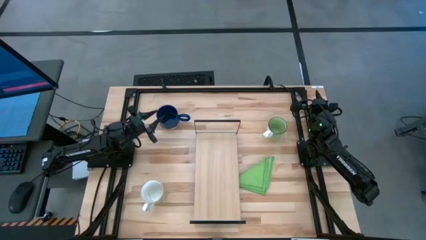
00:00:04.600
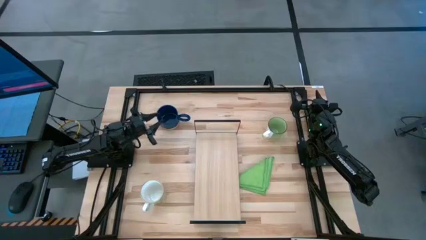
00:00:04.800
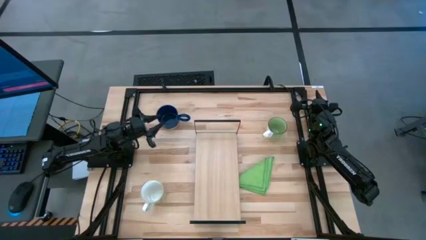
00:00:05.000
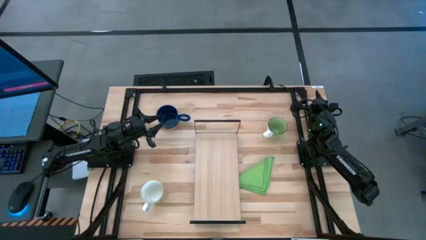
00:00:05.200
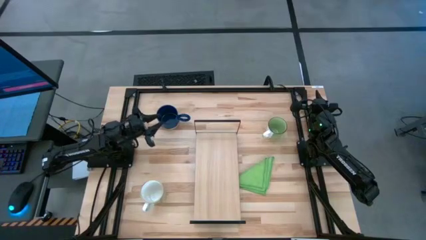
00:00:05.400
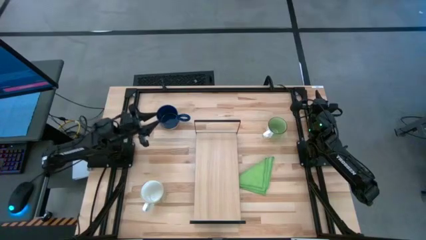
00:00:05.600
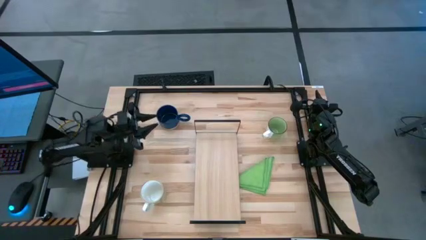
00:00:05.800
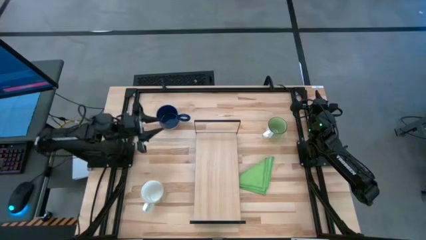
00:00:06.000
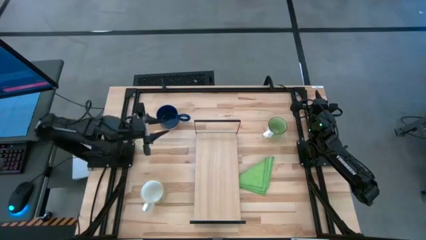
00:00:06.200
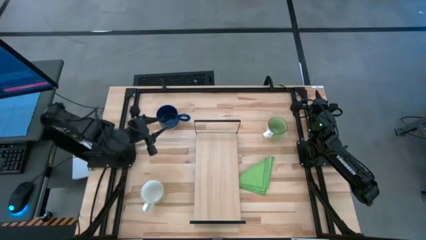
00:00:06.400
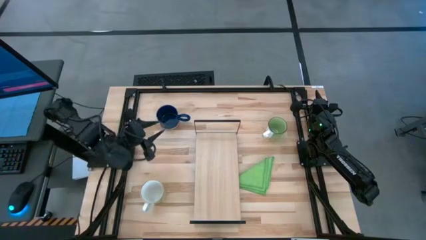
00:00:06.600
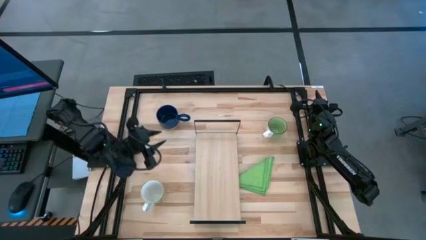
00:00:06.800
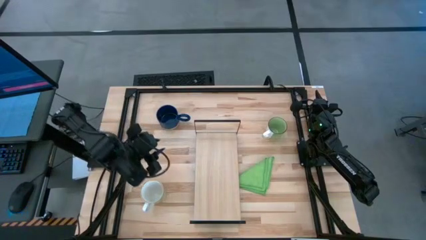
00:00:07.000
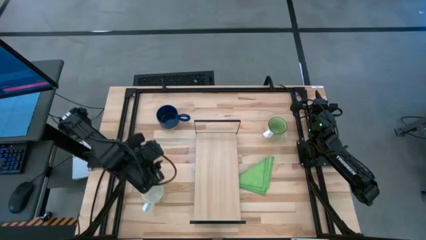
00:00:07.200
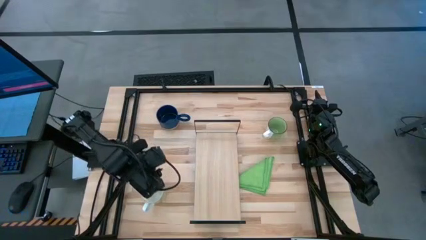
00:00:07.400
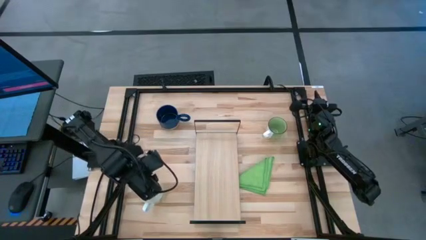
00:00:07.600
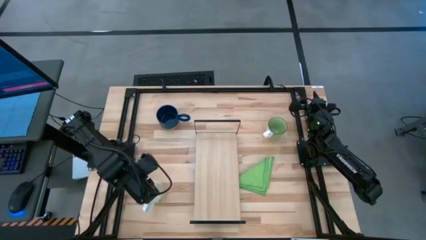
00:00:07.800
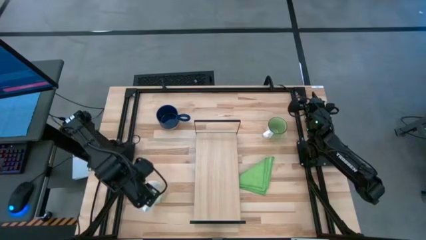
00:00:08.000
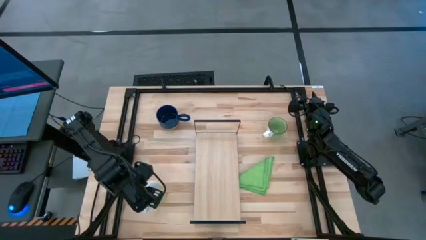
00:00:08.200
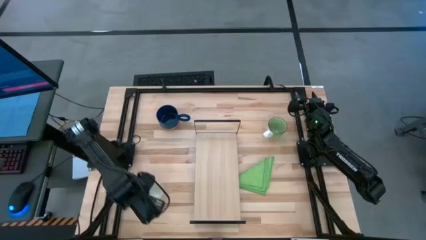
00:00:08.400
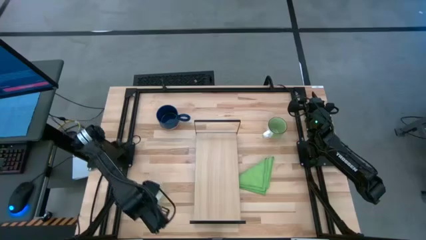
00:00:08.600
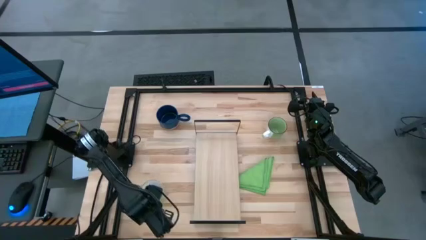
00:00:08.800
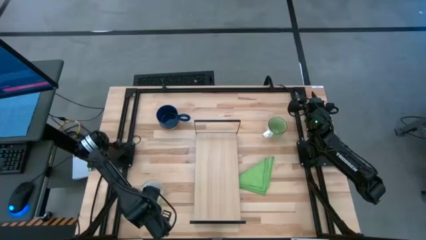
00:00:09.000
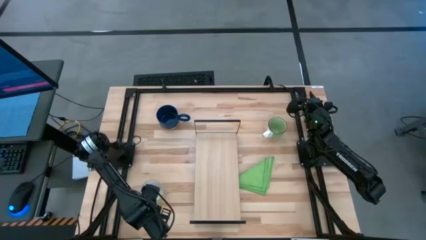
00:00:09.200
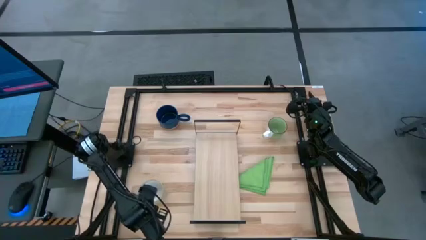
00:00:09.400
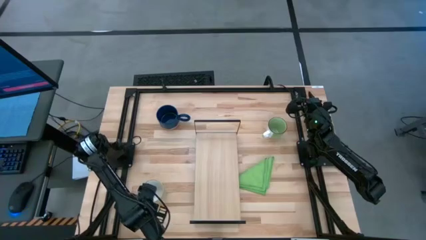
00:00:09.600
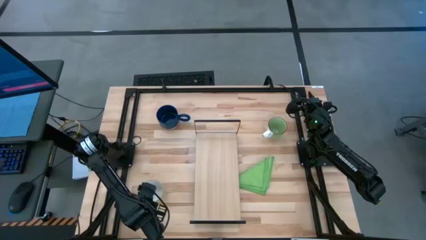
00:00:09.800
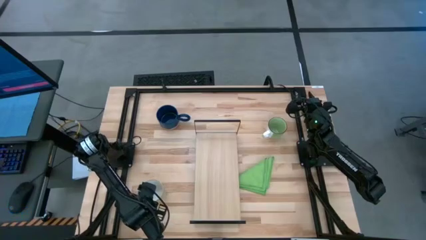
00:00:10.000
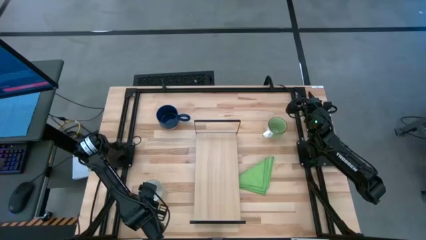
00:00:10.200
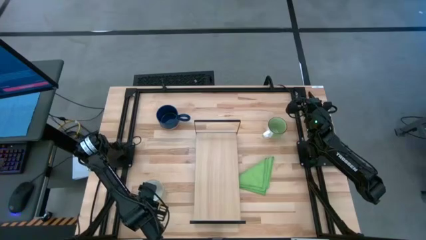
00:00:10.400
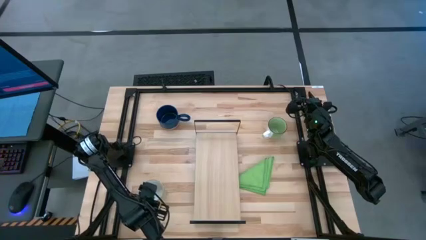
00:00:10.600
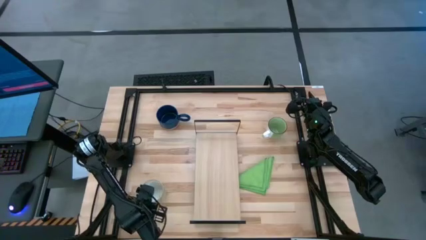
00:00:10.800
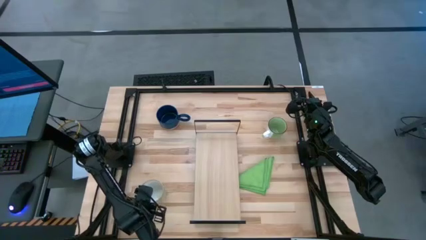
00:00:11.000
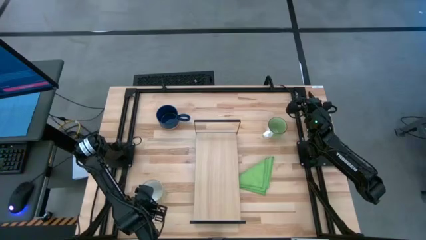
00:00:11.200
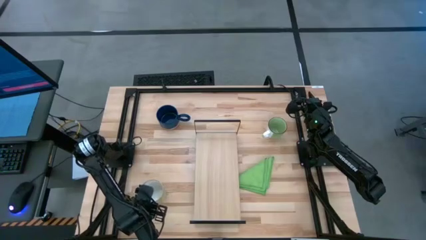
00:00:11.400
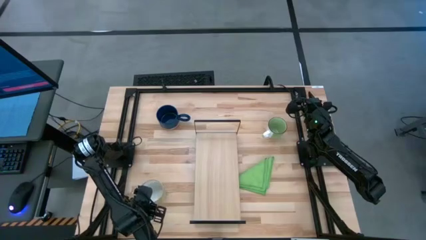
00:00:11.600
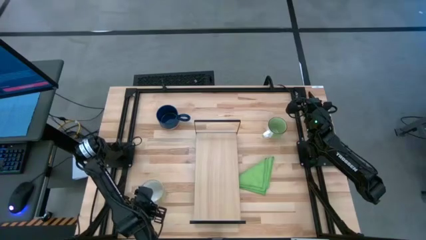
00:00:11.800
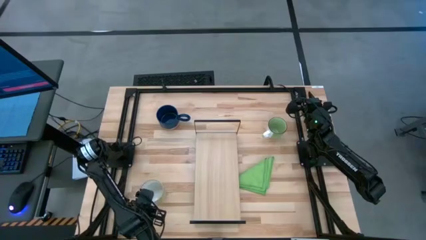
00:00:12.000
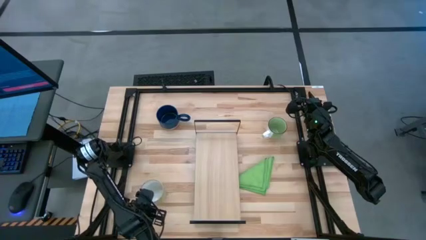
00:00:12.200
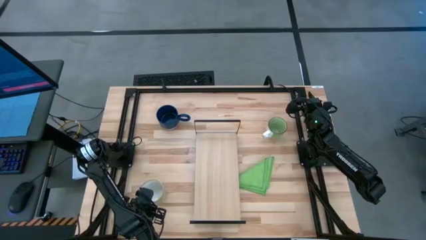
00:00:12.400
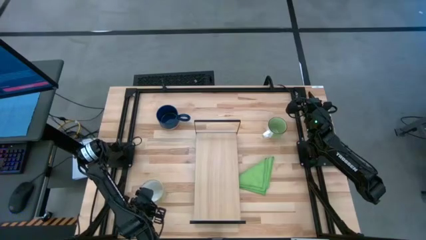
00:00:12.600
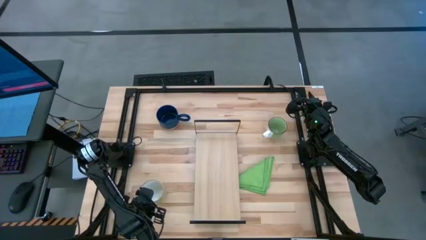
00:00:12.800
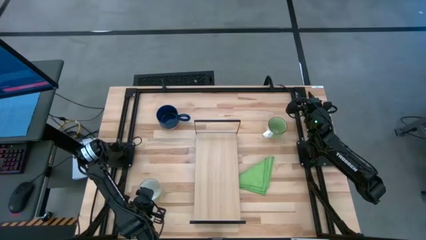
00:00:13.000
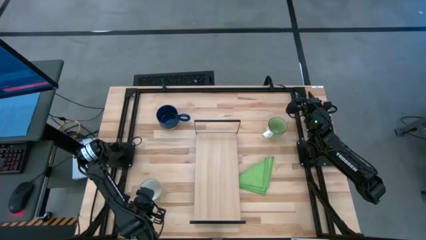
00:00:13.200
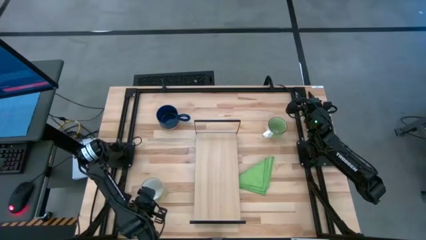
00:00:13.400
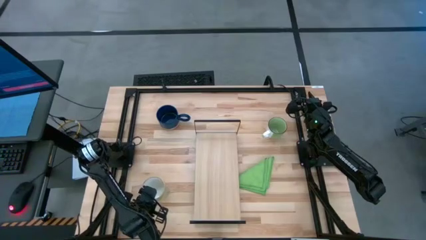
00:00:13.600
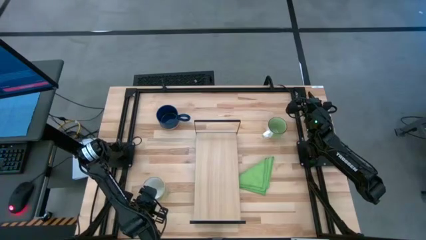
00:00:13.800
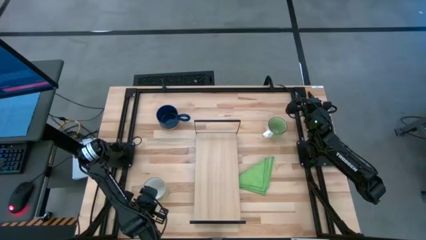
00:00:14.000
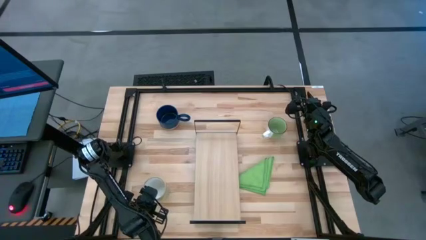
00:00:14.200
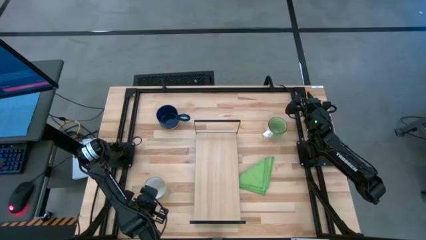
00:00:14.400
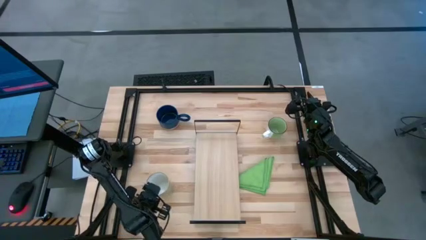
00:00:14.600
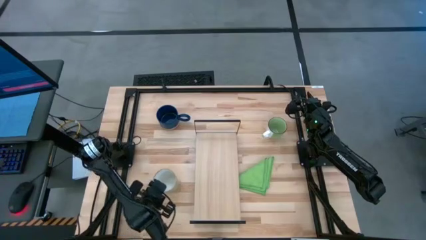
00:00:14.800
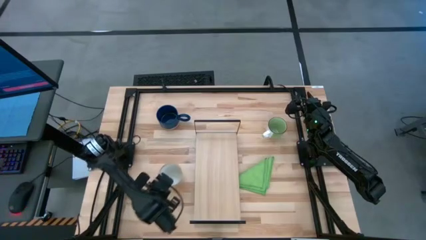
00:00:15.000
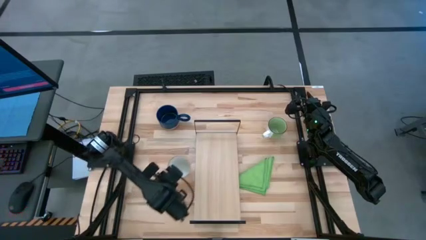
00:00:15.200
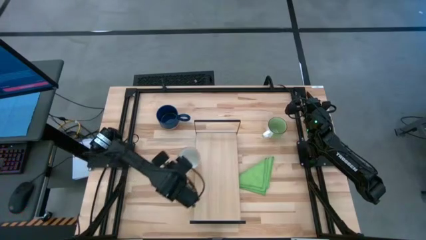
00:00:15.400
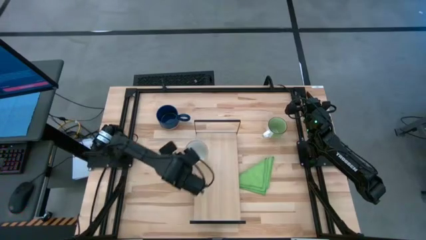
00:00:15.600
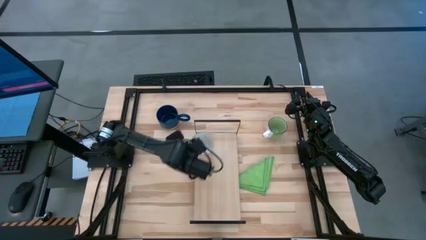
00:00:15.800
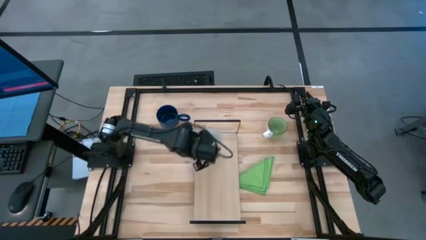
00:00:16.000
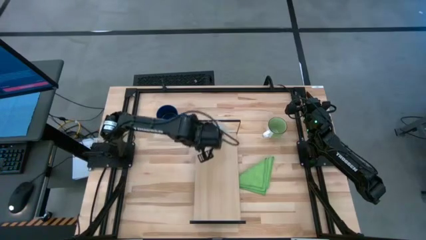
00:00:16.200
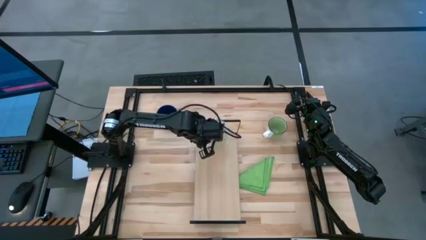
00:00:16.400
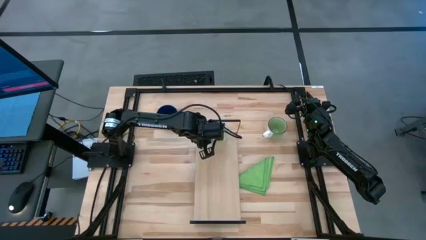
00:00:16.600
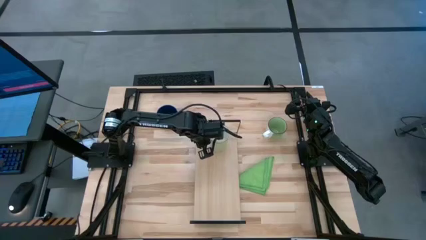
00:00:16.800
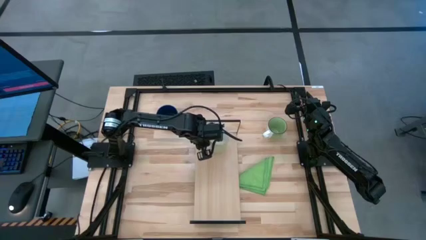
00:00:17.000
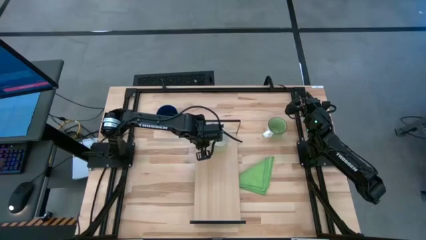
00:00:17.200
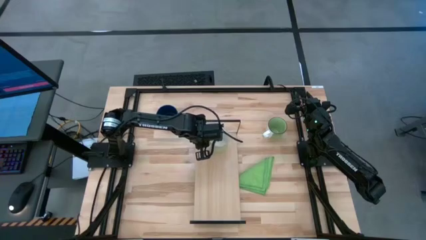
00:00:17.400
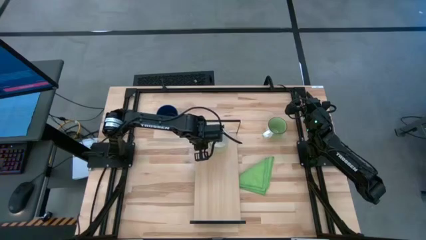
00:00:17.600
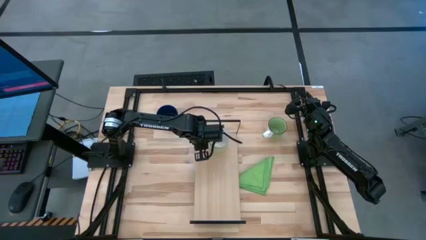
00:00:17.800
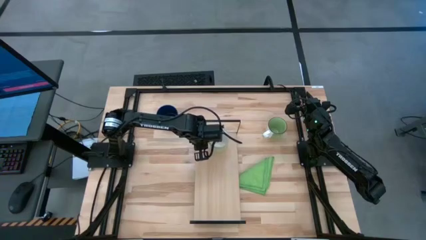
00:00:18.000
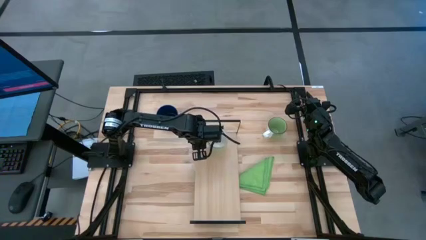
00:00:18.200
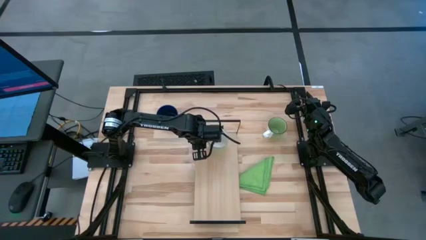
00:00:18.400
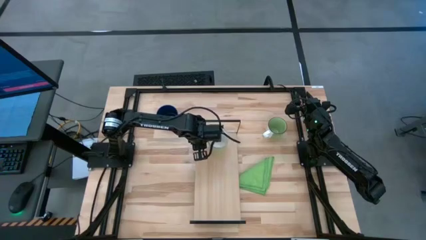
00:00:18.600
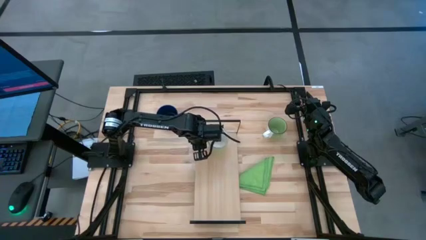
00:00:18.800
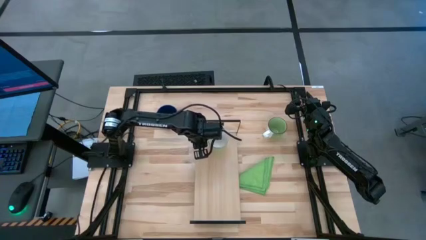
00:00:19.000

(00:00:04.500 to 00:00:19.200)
Task: Stack small to large cups/mugs on shelf
Put the yellow mug on the shelf

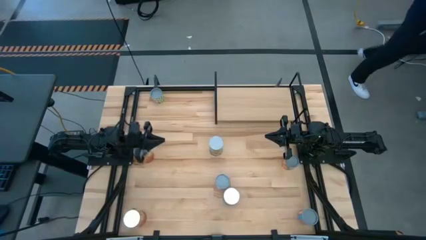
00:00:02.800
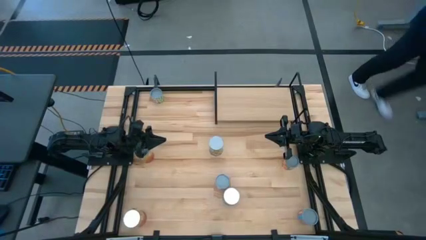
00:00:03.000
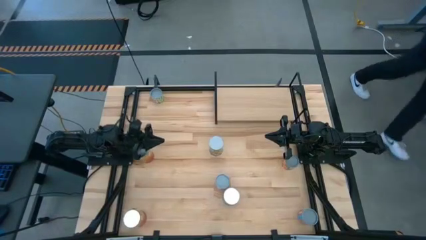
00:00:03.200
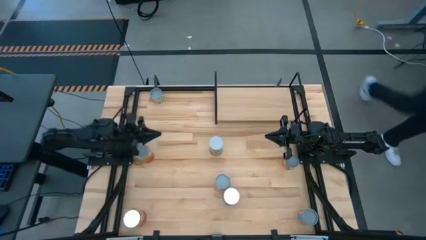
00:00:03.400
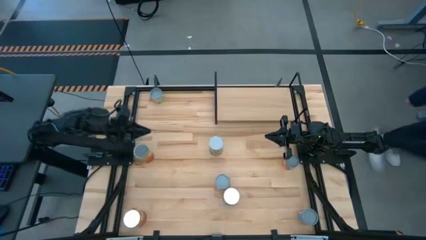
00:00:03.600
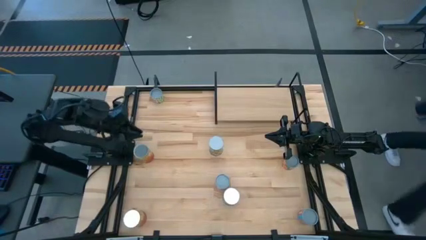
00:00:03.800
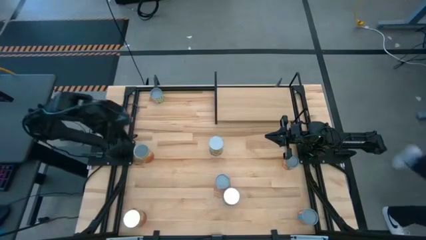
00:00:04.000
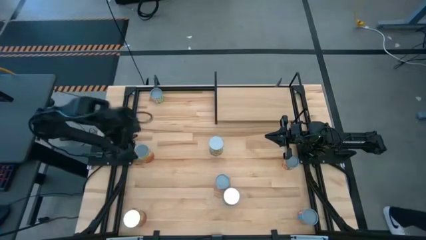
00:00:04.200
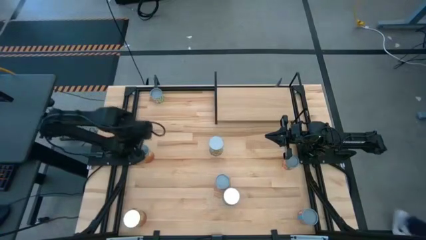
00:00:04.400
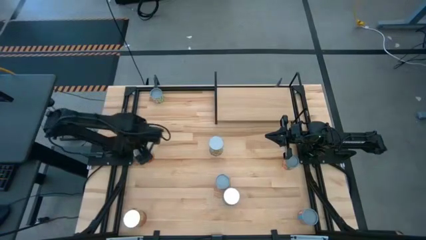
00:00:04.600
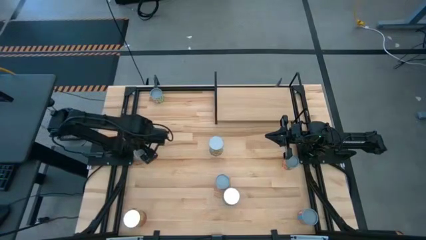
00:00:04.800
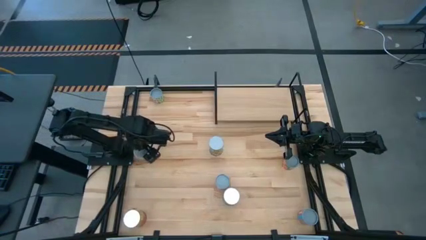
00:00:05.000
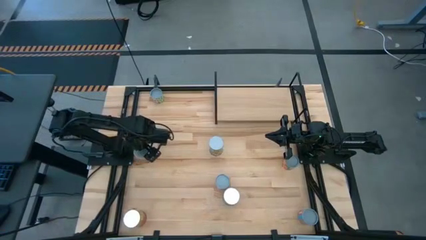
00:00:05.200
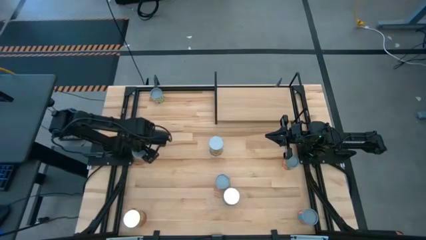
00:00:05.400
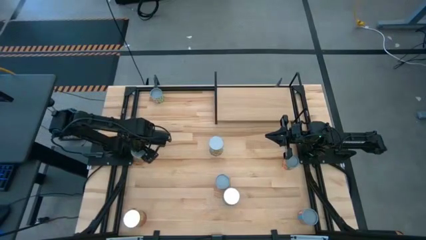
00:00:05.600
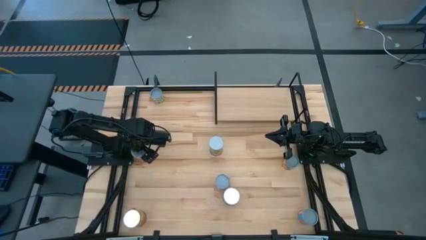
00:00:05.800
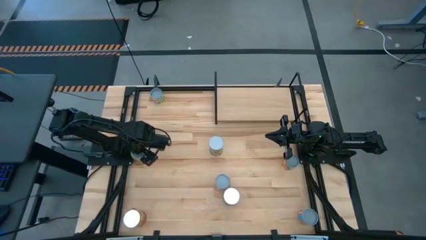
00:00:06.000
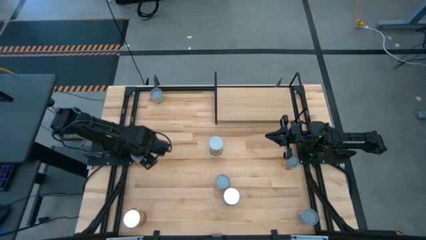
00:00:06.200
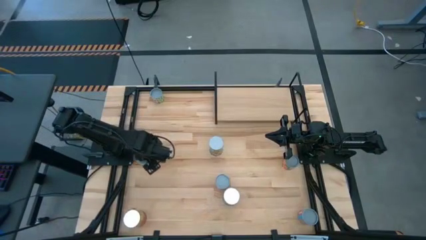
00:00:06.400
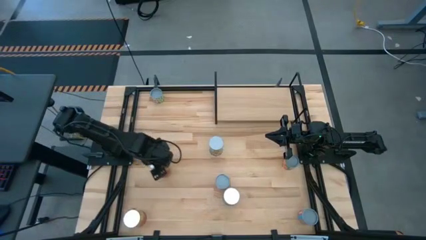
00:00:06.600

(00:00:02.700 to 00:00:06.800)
Task: Pick and place cans onto a shelf
Put the top large canned corn on the shelf
